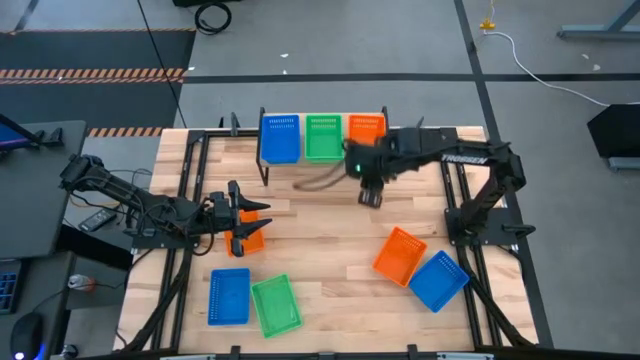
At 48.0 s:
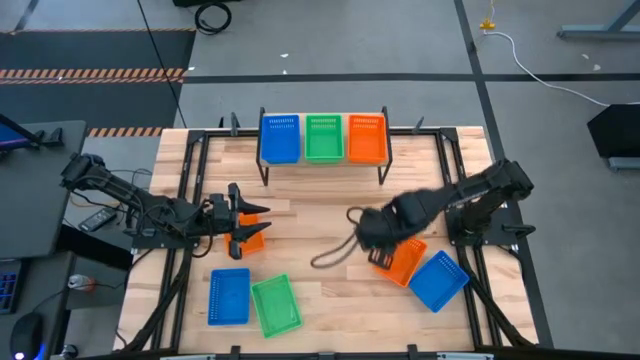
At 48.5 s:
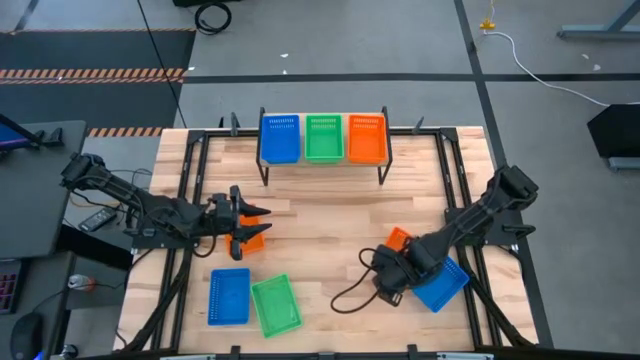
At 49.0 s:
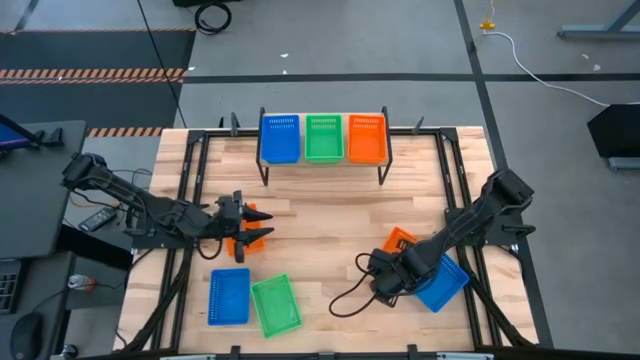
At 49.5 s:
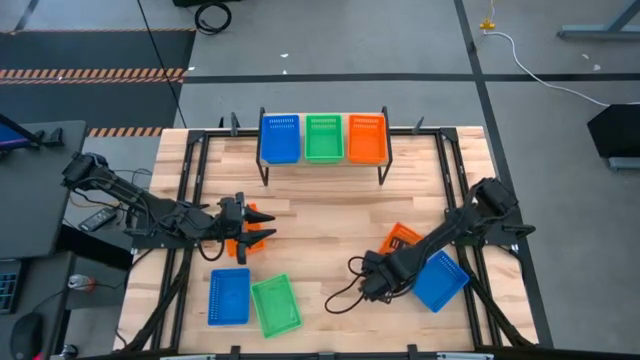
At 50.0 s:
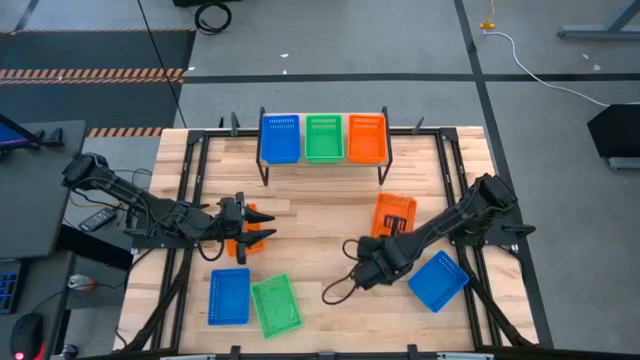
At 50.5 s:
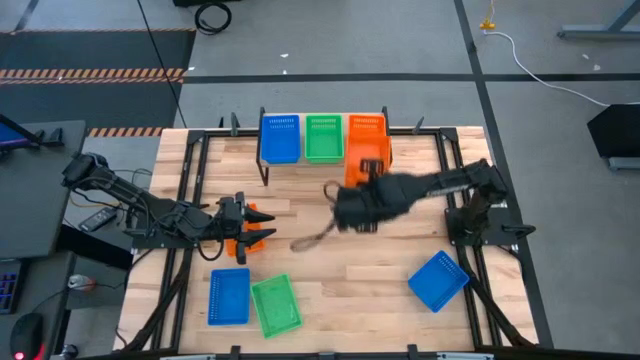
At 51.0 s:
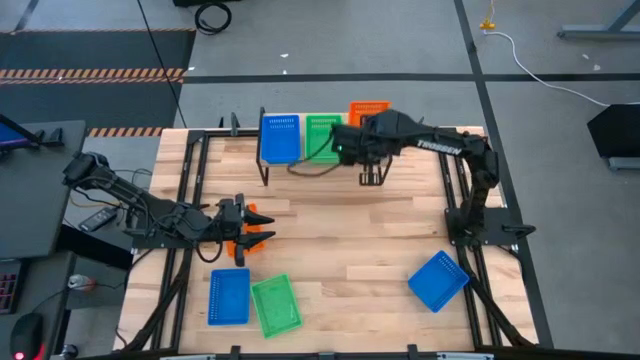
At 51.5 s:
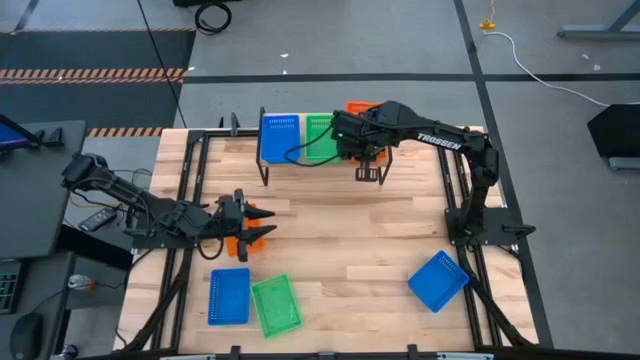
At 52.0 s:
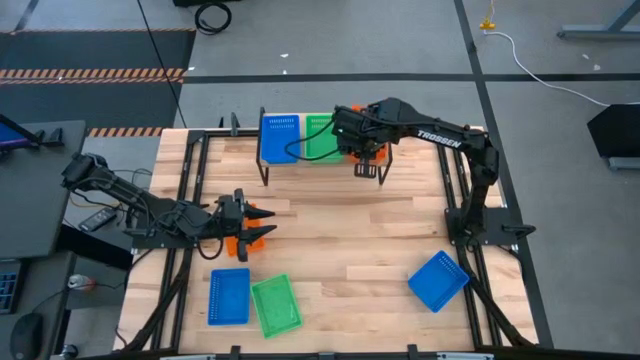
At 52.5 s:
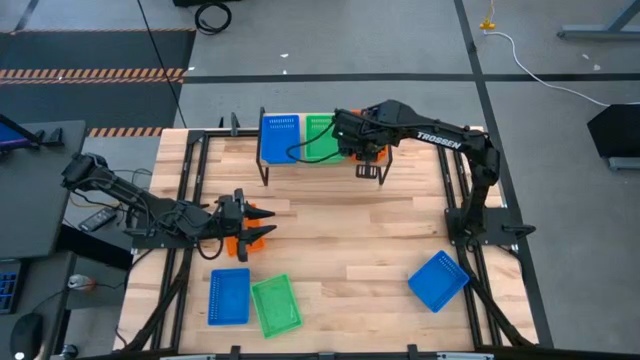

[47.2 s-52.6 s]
Task: Stack baskets on shelf by color
Stack the right orange bin on top of the orange bin on the shelf

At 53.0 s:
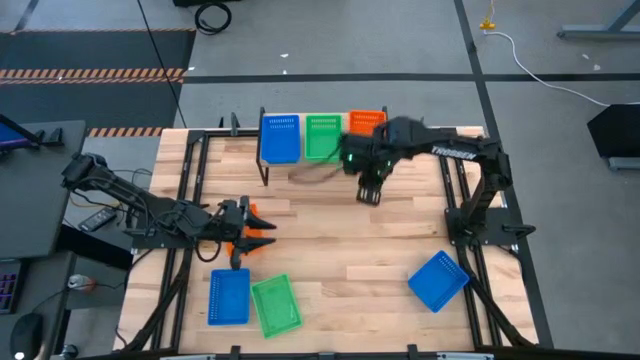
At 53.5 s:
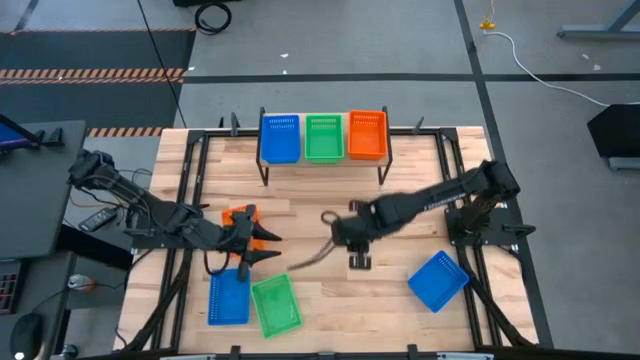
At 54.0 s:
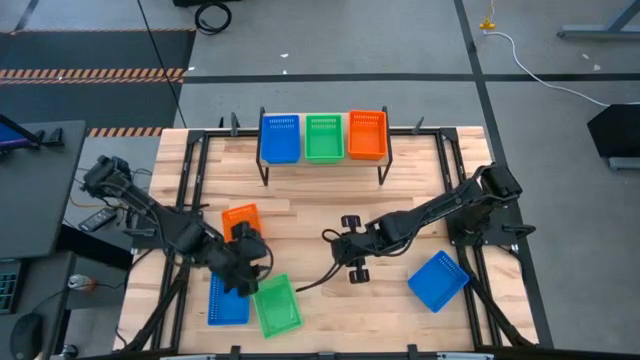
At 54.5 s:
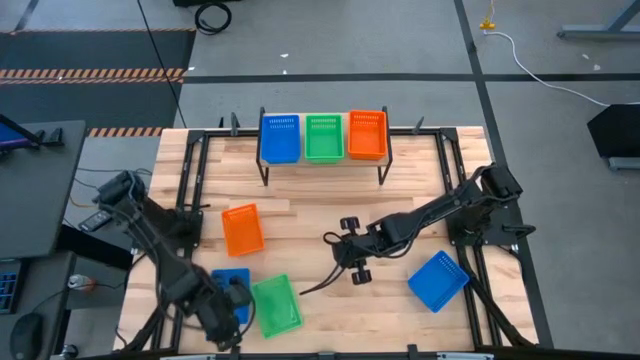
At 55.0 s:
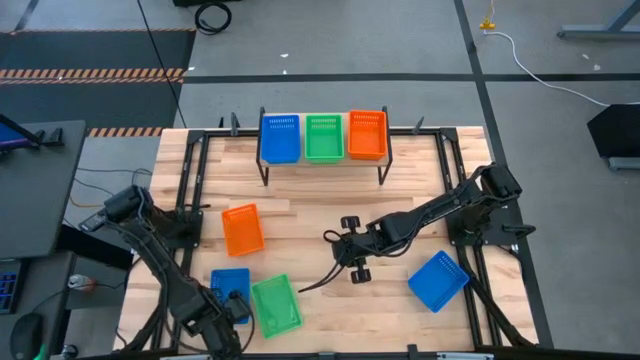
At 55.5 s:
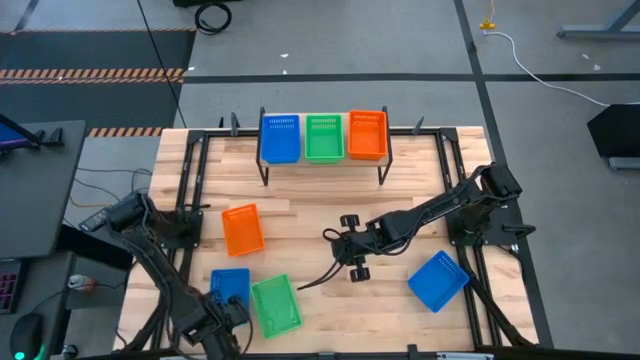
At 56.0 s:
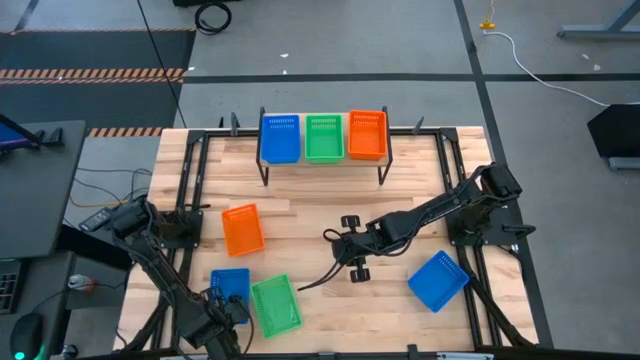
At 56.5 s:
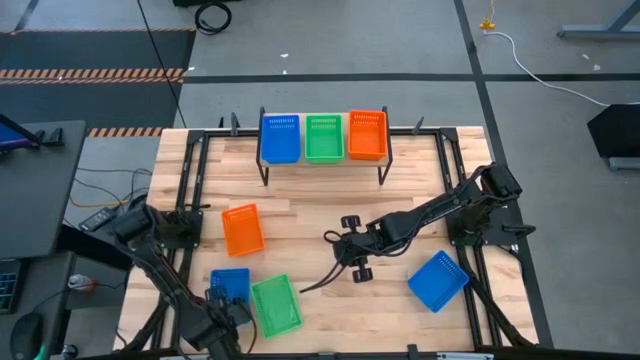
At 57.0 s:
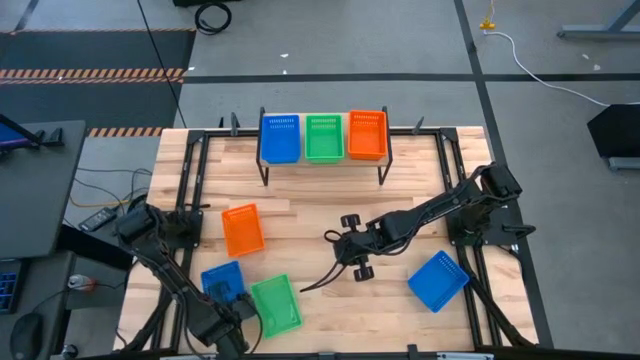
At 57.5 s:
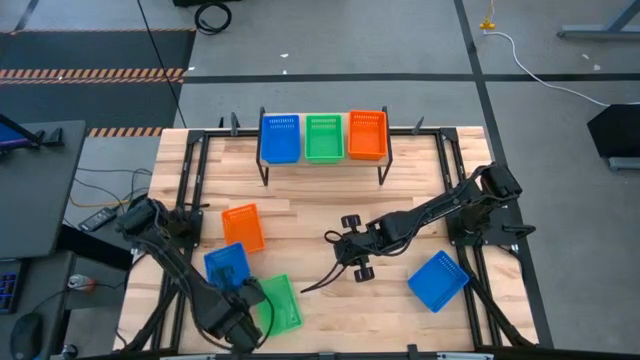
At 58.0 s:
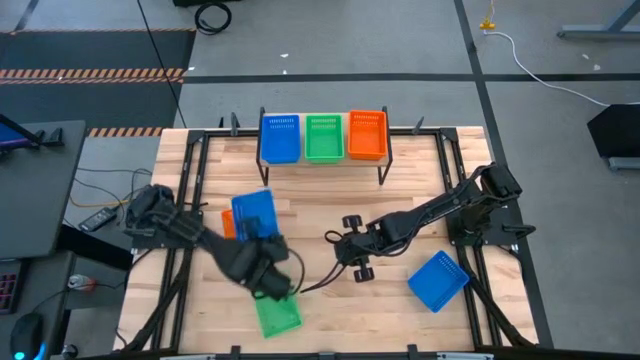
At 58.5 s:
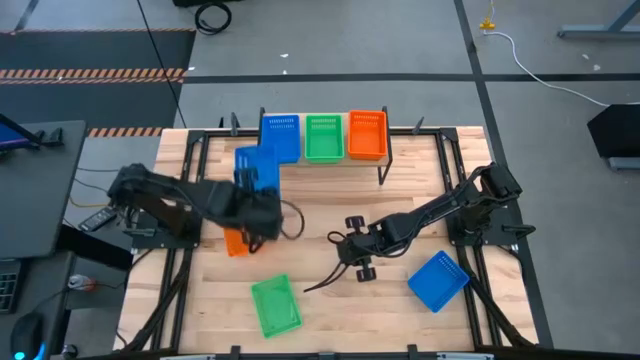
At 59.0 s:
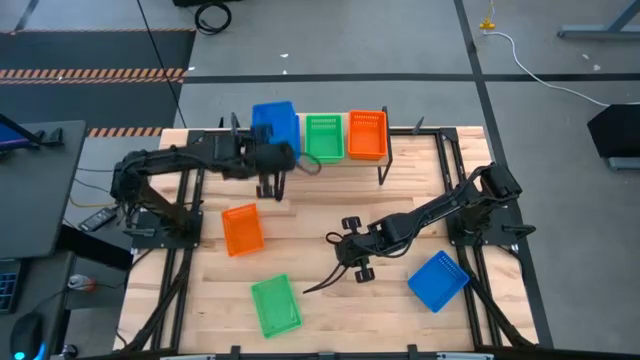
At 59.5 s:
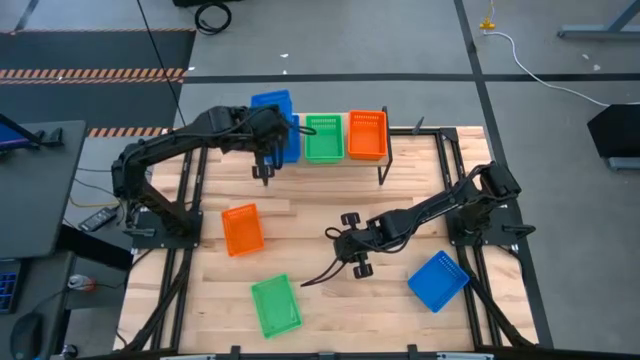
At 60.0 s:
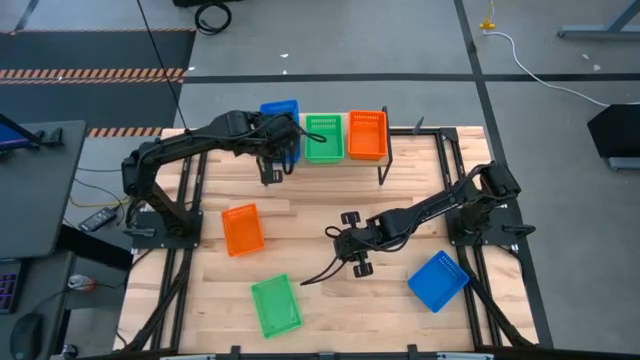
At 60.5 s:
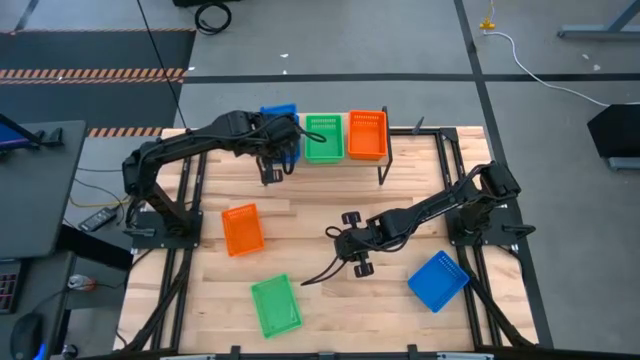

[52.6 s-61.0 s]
Stack the left blue bin on top of the blue bin on the shelf

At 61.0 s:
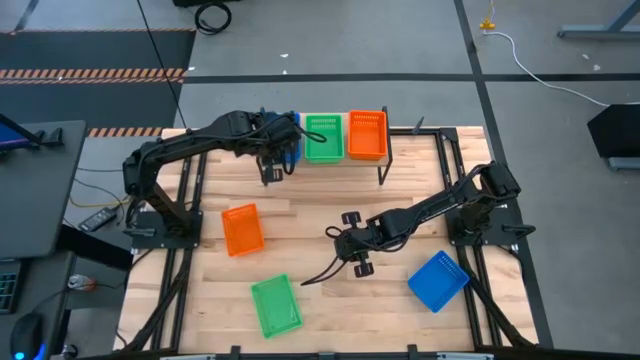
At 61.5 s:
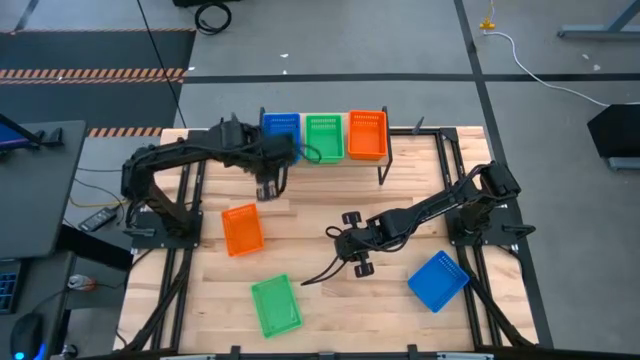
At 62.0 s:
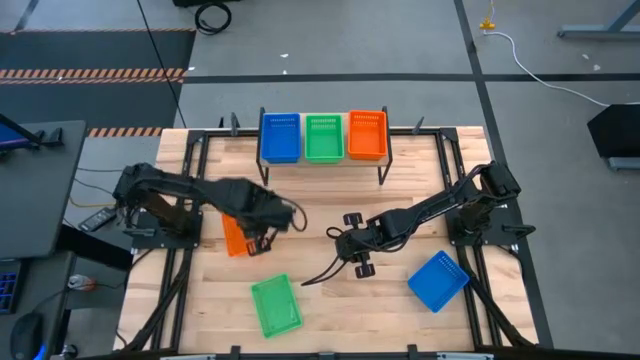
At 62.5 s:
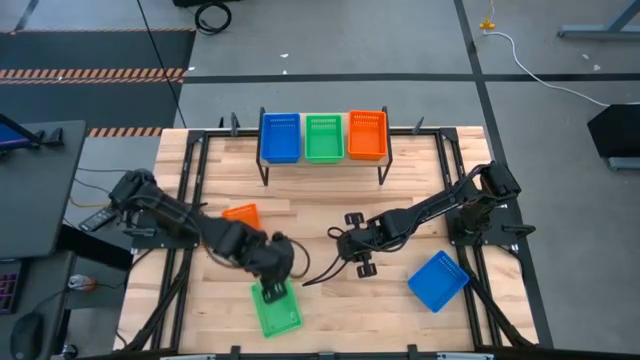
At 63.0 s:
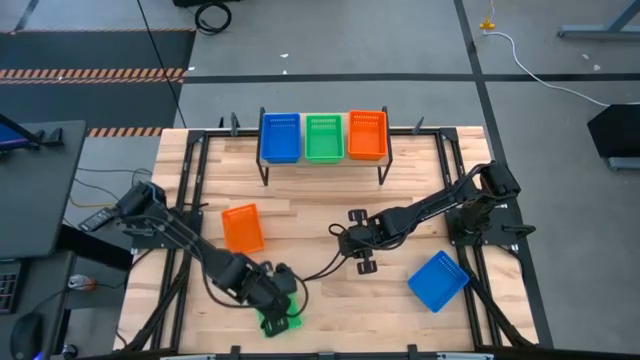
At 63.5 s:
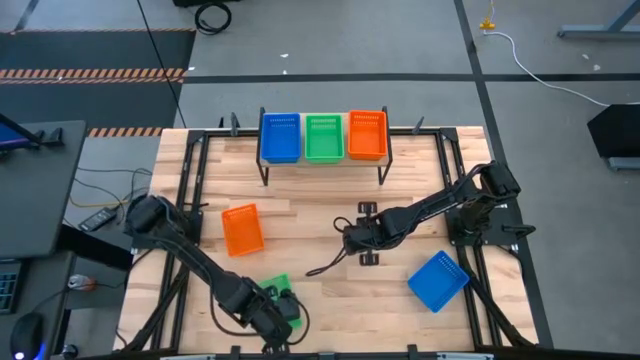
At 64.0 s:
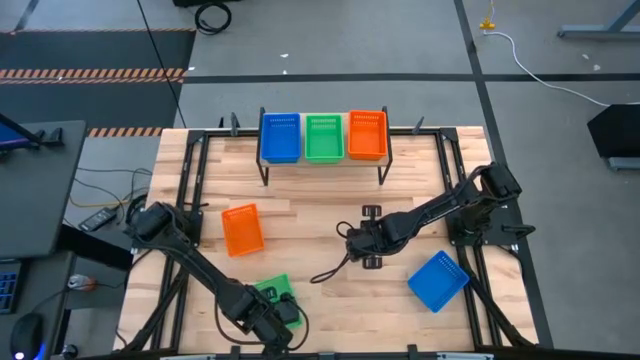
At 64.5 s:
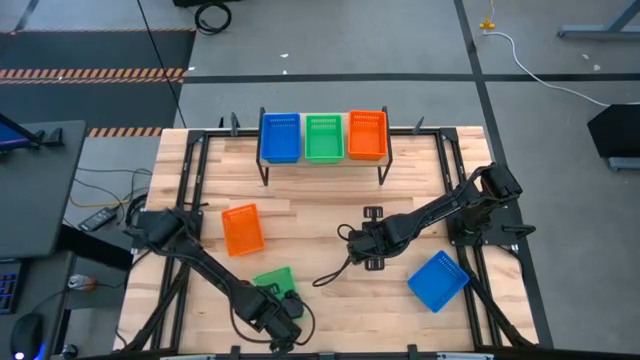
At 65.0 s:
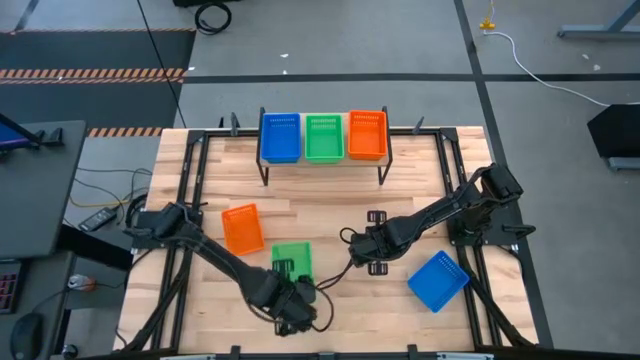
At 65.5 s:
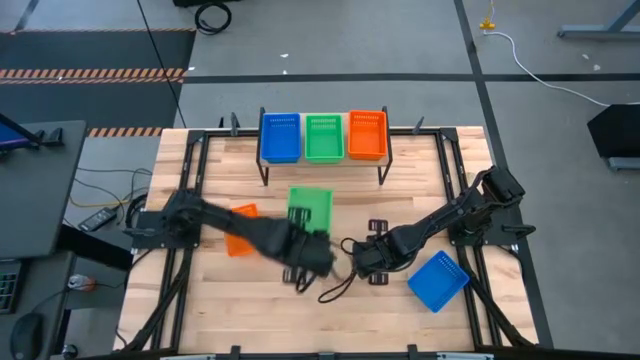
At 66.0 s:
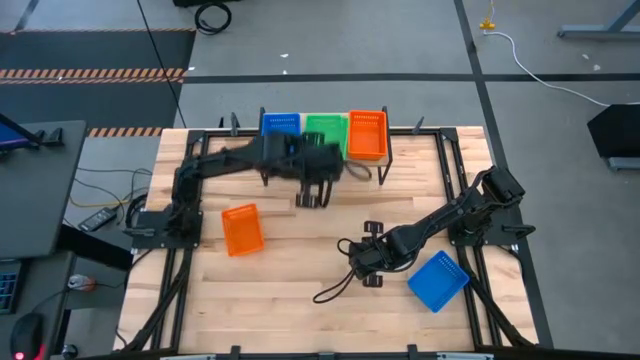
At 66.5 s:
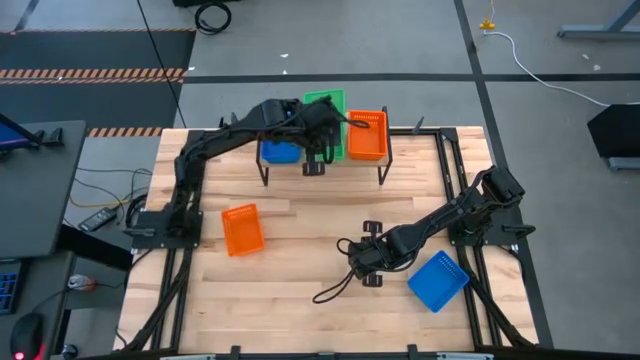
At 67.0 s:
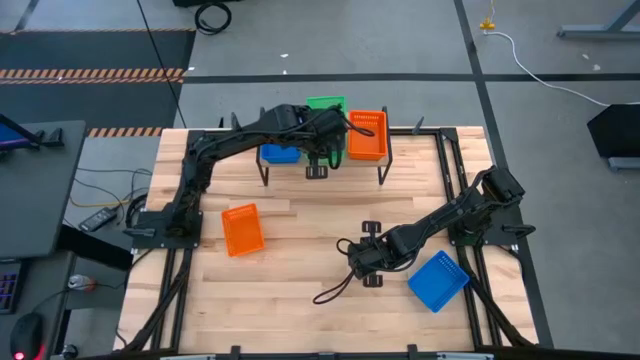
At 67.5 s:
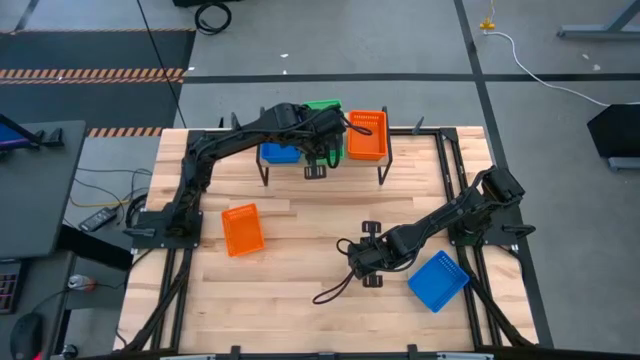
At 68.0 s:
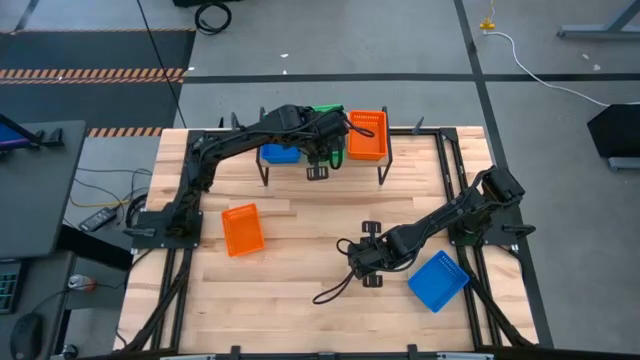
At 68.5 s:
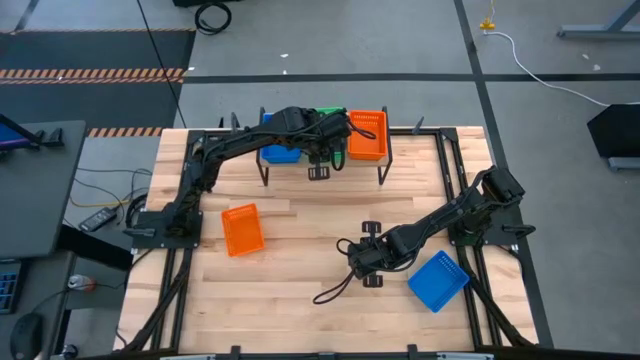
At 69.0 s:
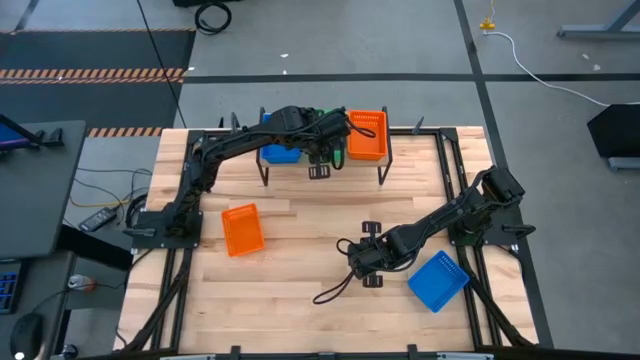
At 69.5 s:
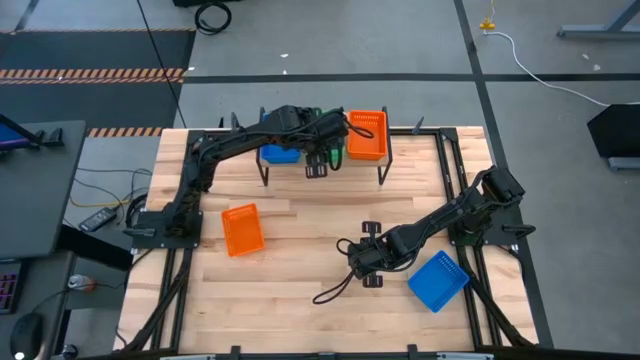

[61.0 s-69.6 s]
Stack the green bin on top of the green bin on the shelf
